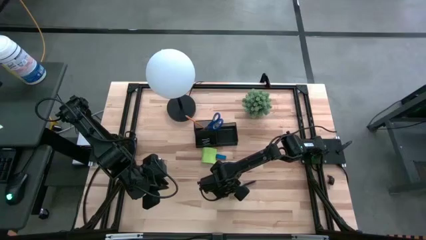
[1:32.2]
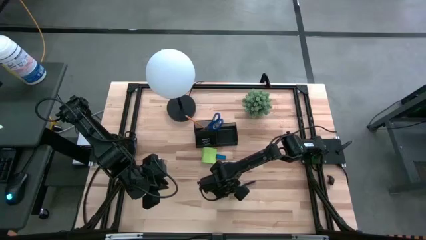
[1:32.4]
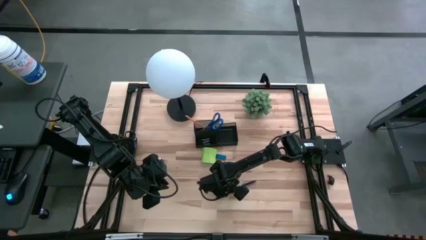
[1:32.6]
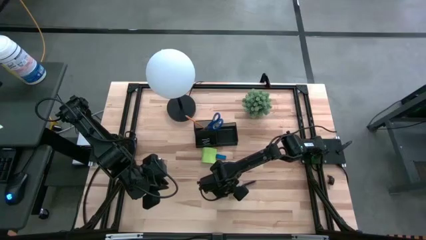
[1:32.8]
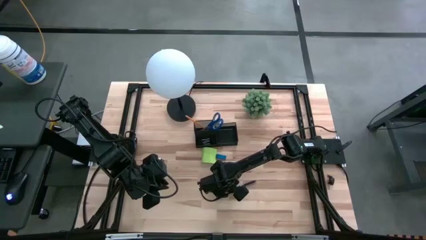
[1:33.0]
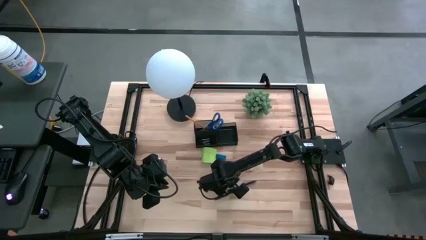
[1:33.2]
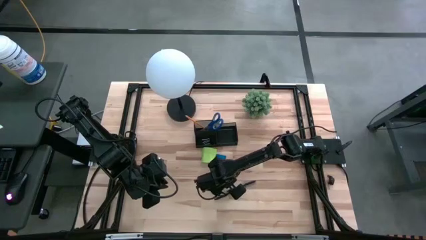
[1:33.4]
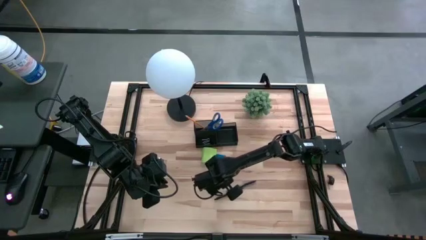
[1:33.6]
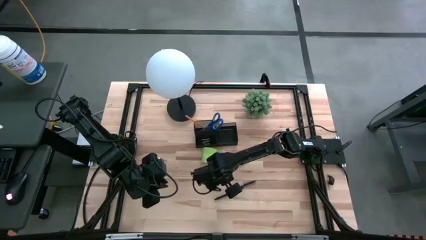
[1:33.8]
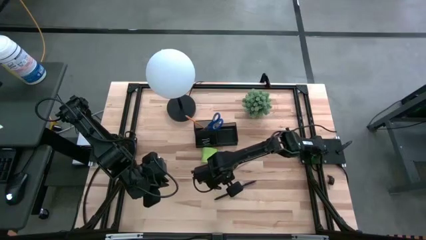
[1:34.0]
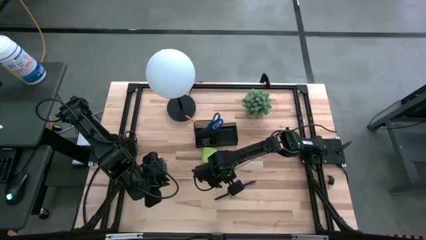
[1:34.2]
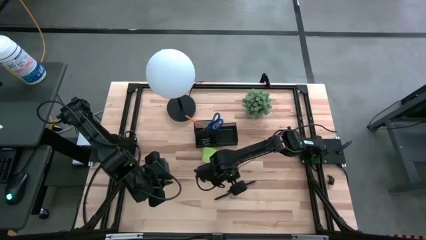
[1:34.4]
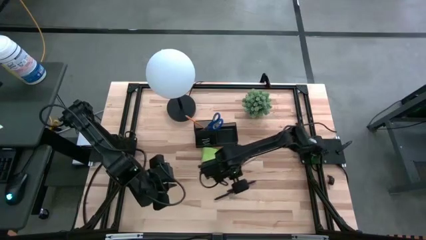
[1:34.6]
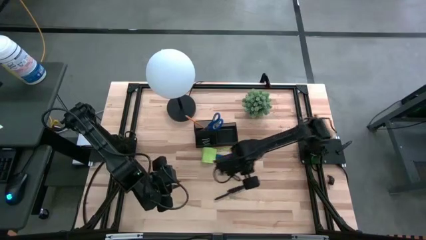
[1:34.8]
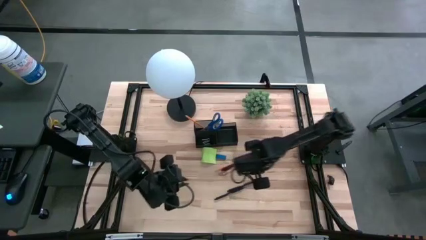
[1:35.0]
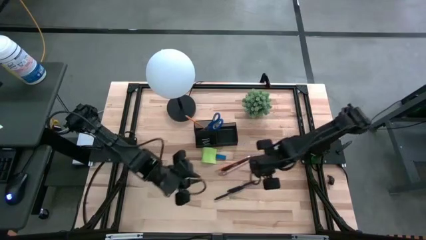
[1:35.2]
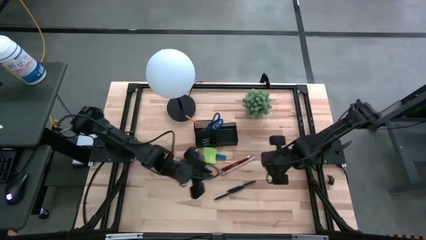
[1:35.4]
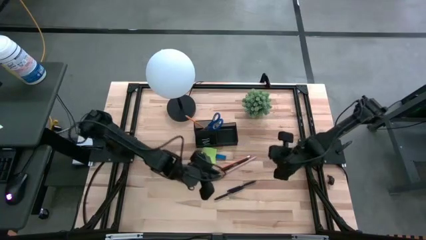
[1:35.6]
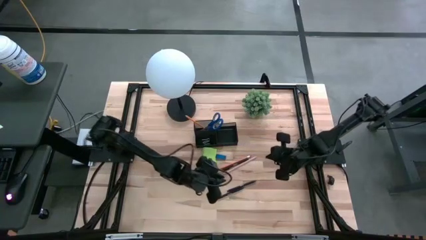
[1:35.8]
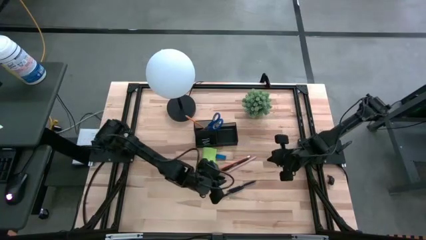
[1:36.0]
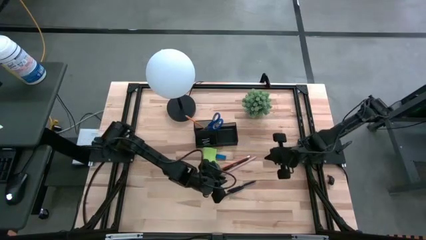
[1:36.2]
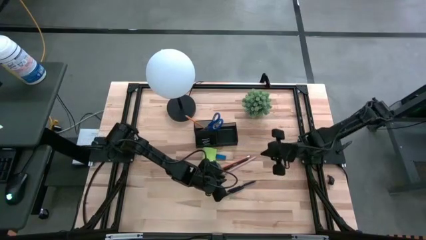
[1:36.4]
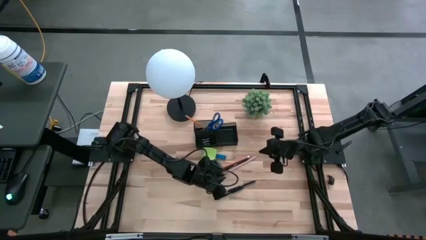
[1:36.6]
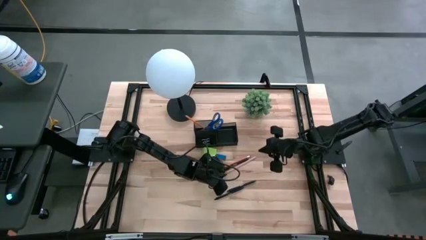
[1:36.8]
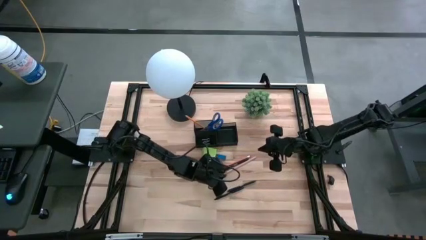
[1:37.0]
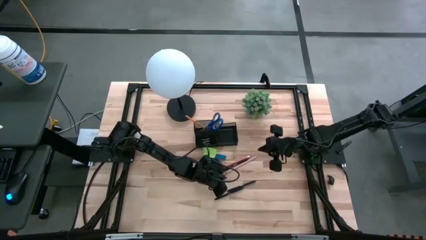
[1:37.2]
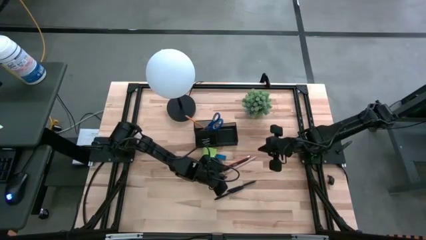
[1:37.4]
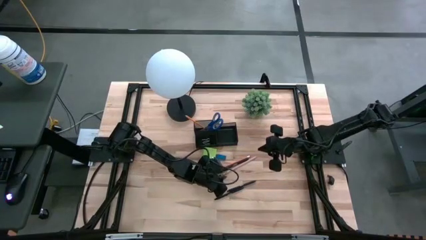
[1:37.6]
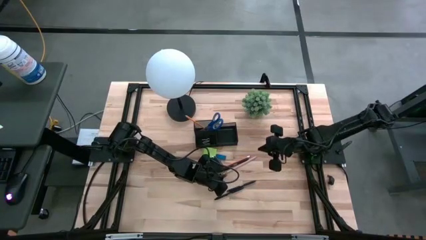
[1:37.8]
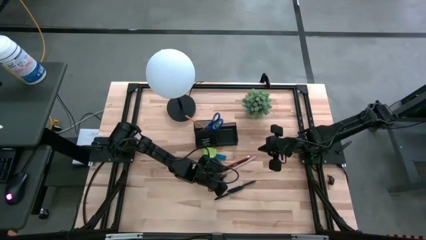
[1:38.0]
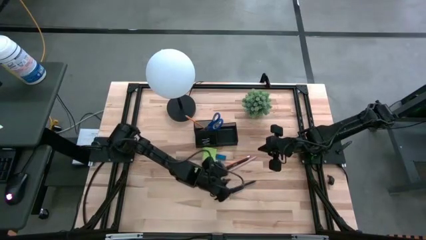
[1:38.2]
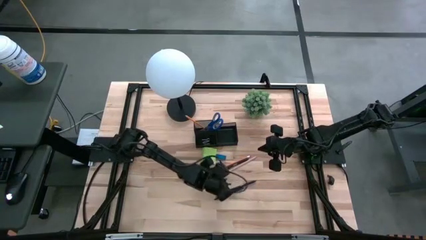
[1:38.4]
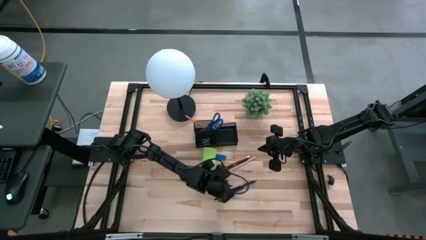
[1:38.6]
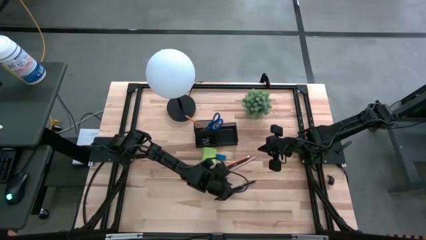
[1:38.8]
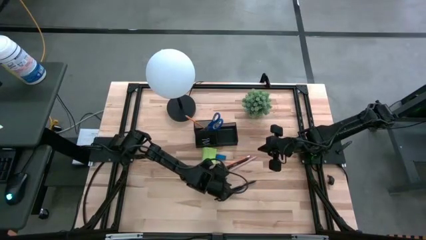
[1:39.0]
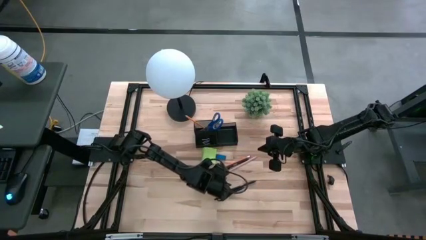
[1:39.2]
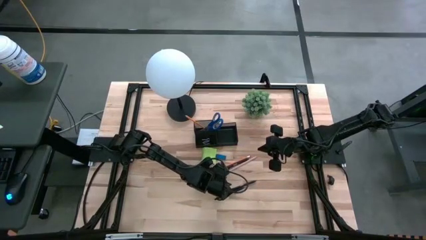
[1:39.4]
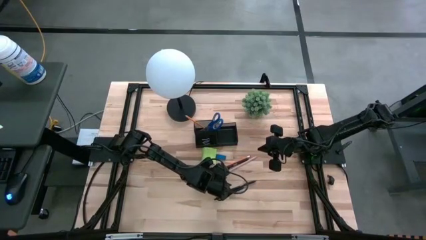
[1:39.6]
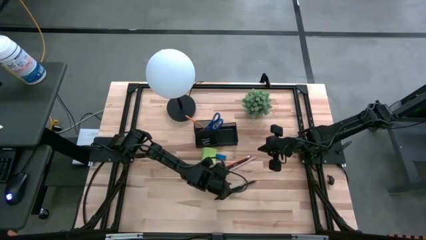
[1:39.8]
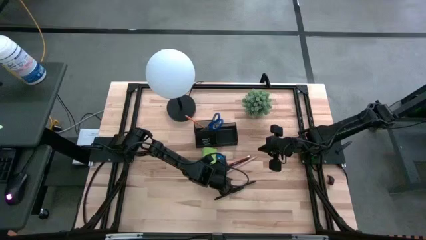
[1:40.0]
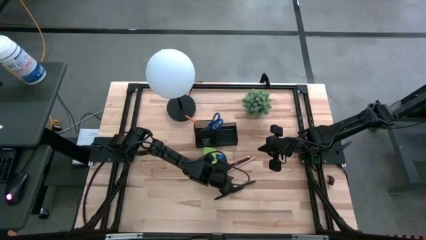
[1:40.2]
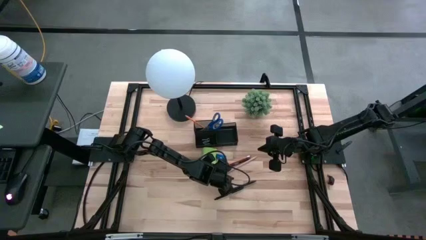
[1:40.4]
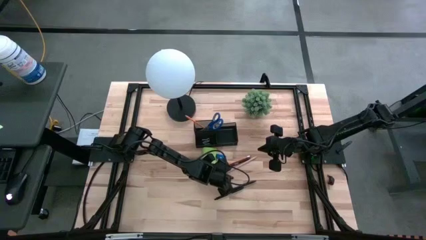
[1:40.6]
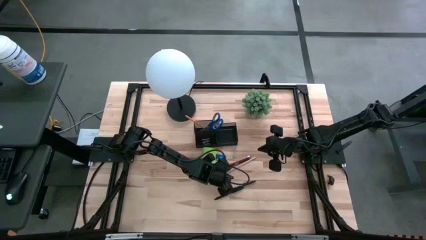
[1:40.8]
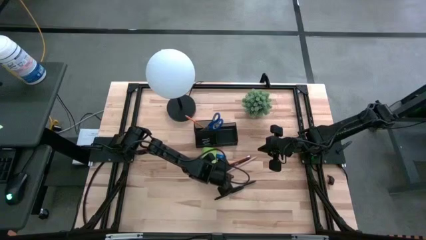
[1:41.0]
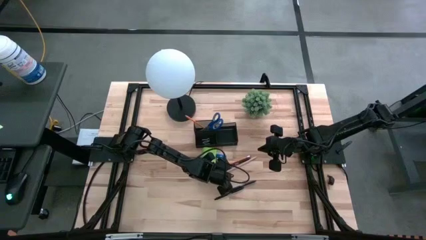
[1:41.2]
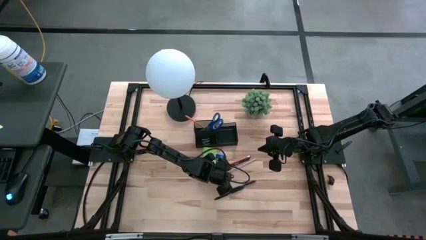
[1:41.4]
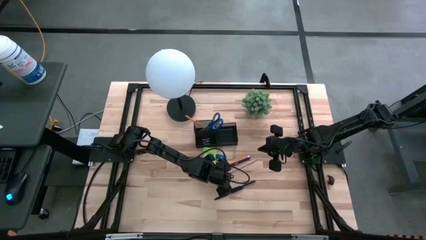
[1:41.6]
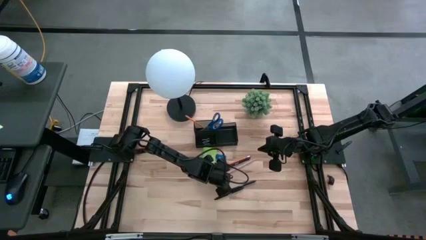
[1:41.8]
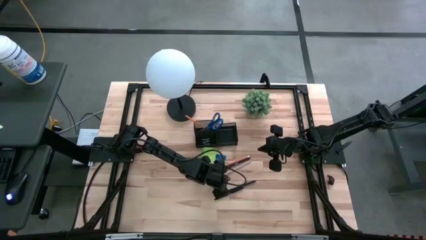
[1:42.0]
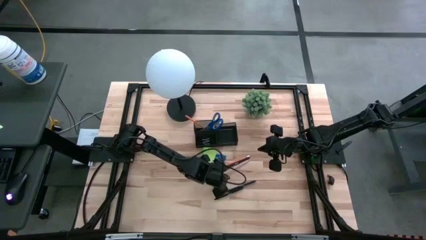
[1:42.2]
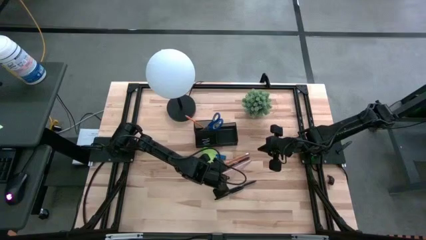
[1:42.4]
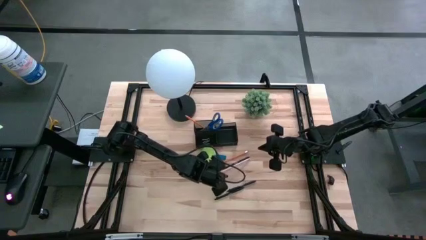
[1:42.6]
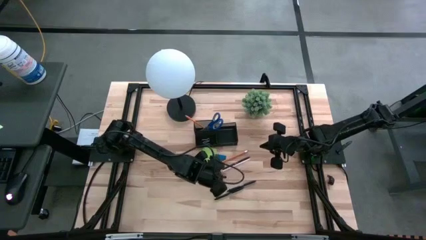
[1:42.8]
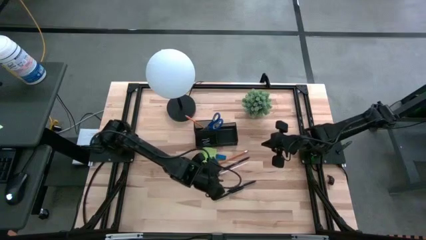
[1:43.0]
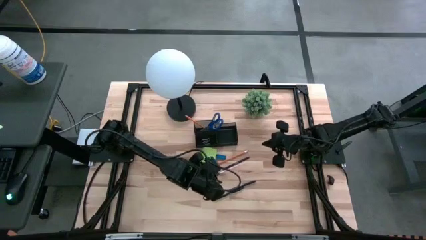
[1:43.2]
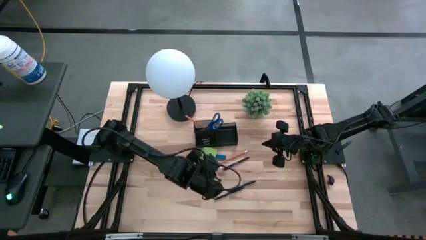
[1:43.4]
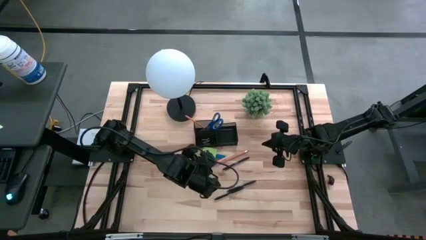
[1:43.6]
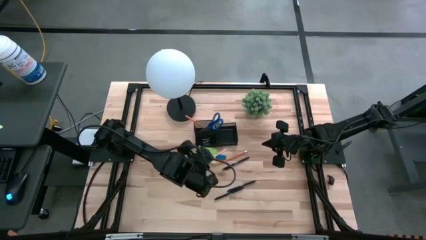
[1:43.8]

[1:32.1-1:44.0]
Task: Pick and place office supplies into organizer
Put the pink pencil into the top left side of the desk organizer
